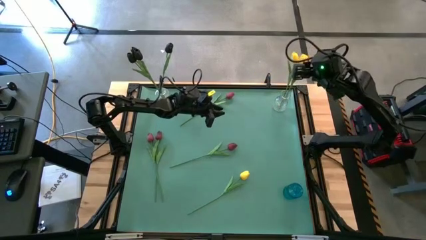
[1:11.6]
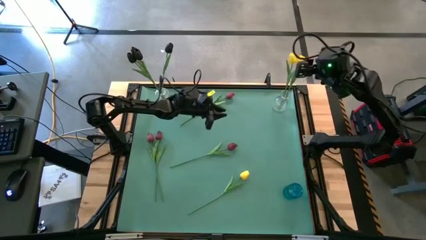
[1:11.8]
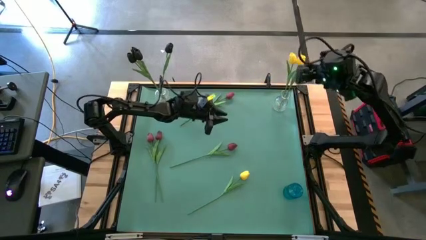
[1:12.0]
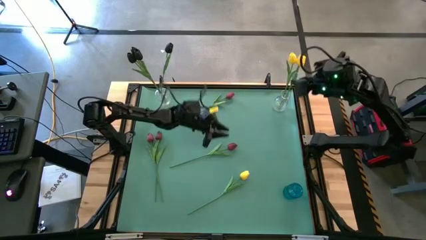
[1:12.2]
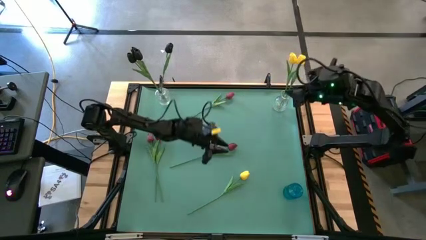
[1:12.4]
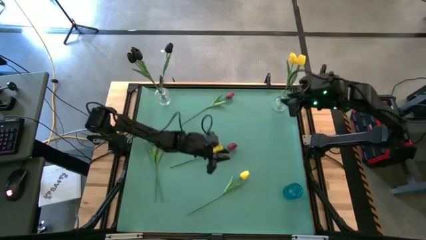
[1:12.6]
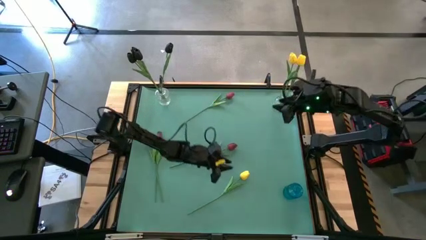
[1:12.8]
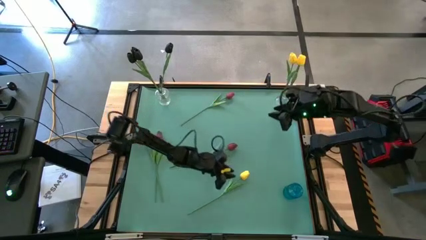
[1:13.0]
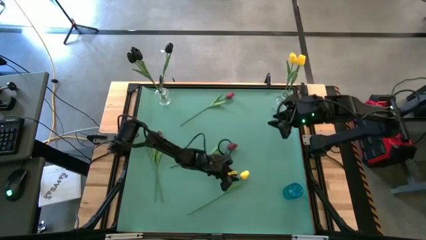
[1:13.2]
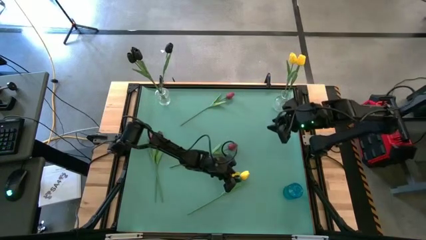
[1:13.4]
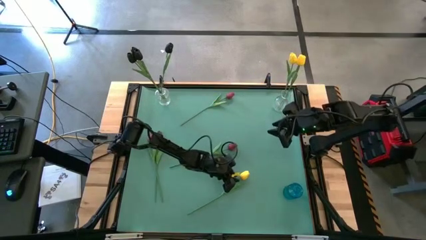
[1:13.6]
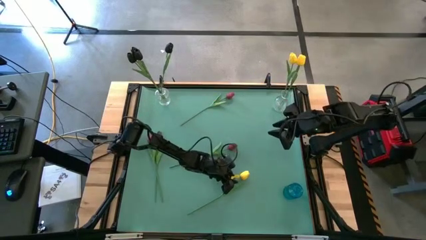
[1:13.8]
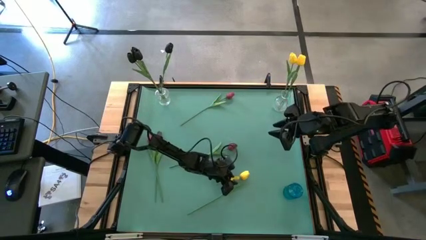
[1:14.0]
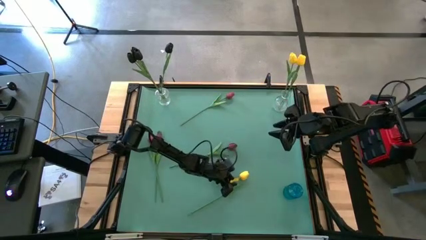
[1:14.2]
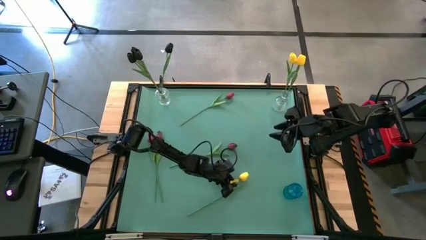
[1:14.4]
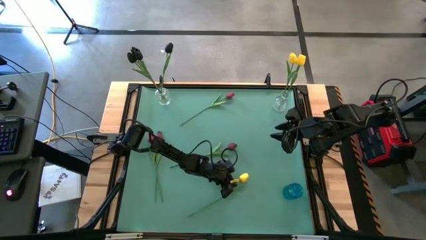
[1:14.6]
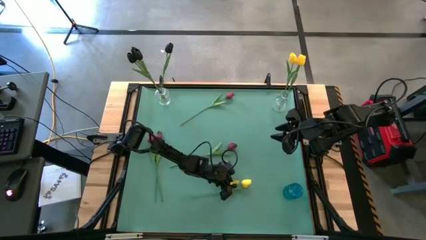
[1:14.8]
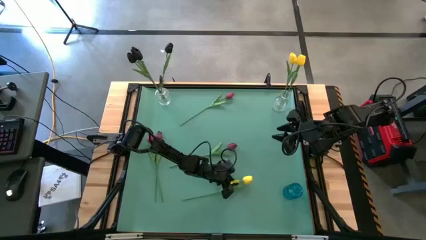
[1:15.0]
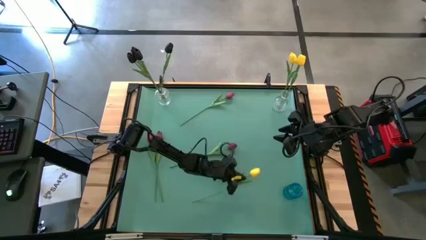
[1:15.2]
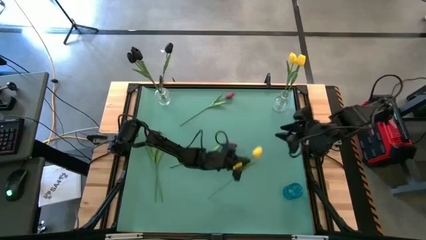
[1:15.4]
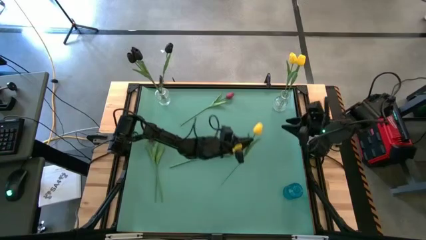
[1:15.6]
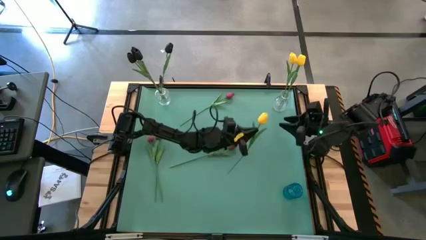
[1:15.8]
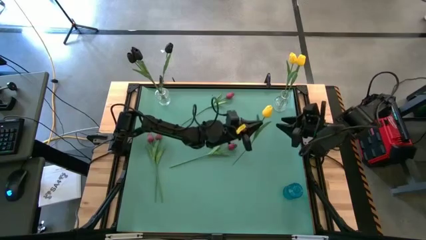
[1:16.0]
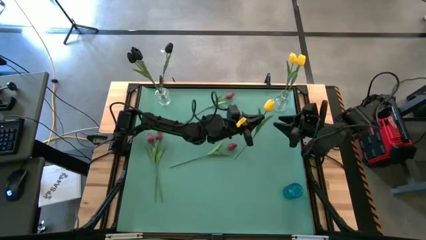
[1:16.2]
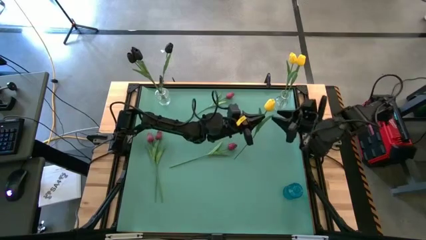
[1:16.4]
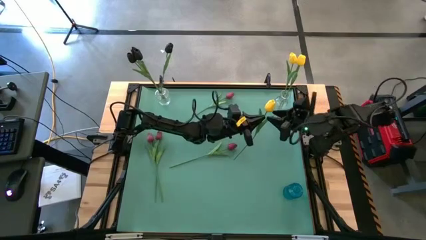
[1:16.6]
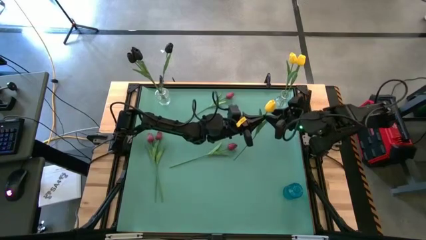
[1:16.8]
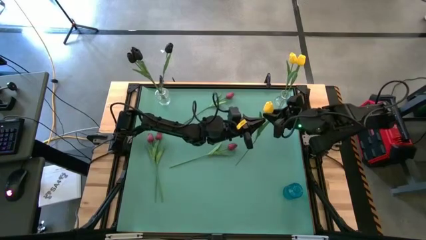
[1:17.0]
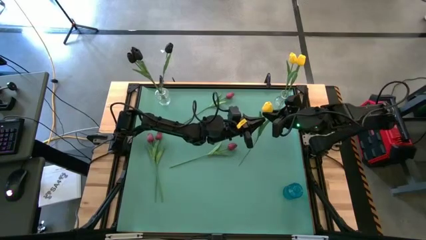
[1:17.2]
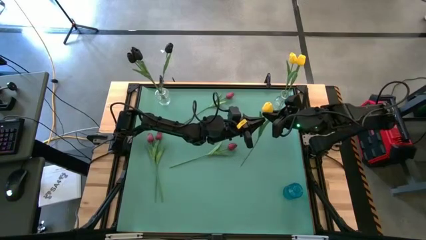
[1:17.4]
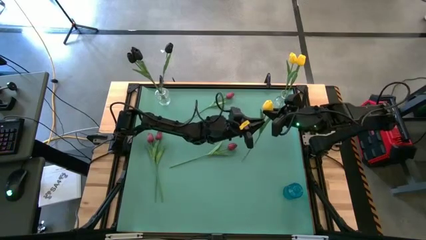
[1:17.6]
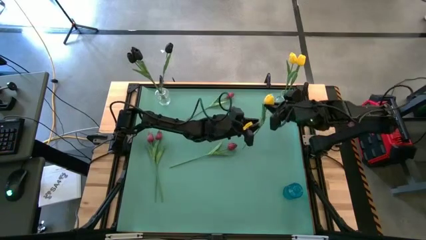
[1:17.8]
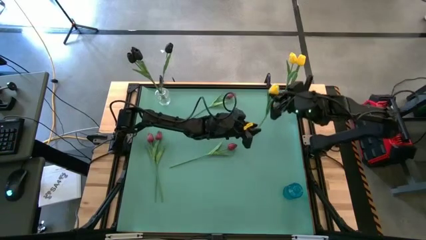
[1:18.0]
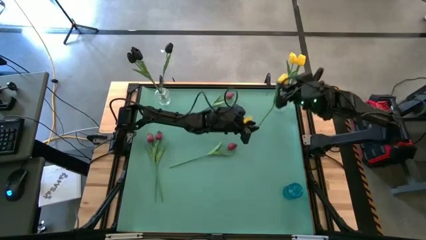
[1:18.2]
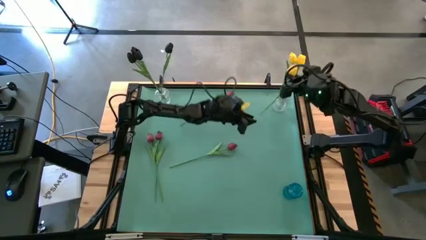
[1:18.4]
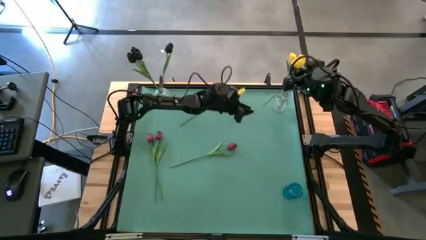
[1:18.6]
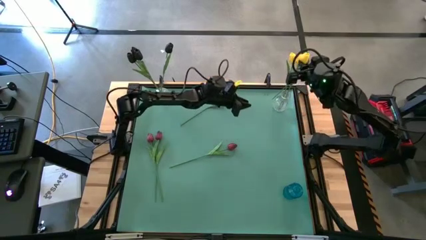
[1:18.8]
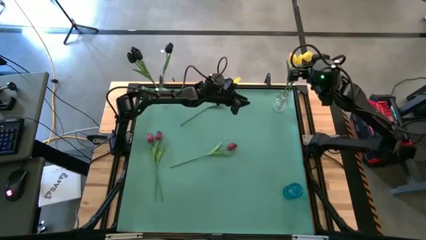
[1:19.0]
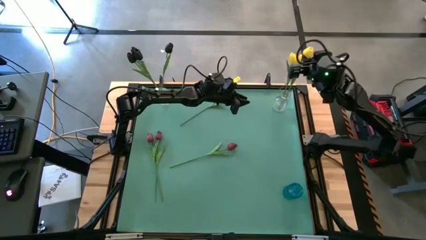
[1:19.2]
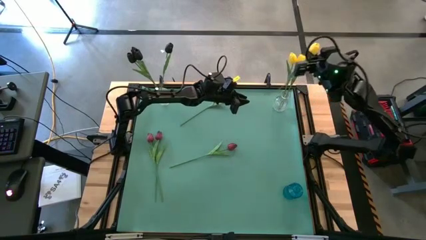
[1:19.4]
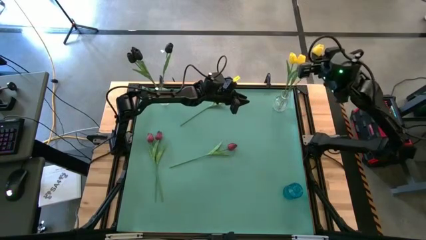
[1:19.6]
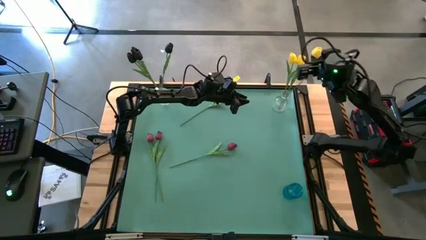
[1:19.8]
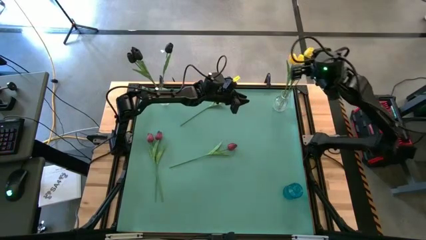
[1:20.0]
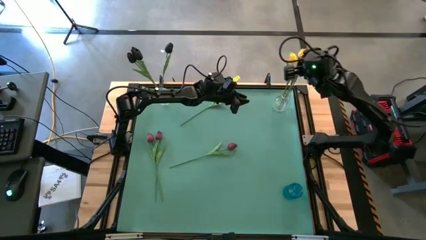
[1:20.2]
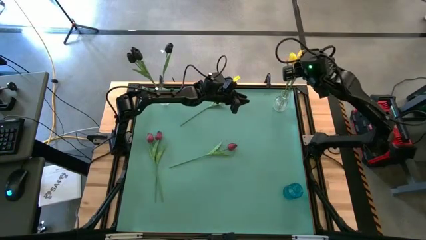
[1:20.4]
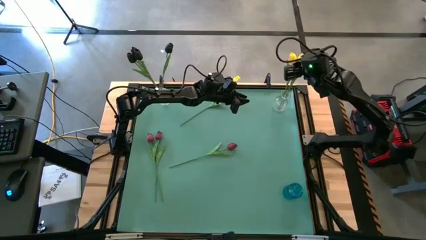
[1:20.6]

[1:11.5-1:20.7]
Task: Sort flowers into vase by color
Put the yellow flower into the right transparent vase

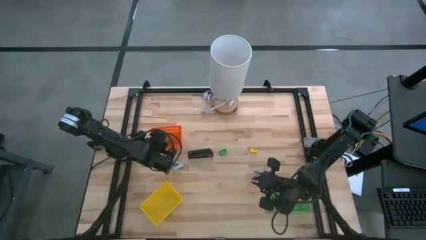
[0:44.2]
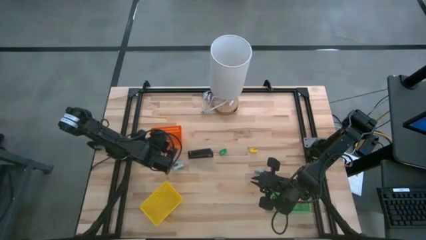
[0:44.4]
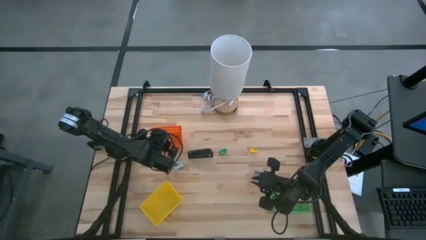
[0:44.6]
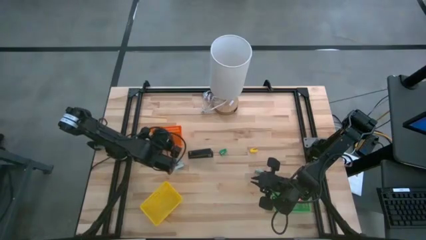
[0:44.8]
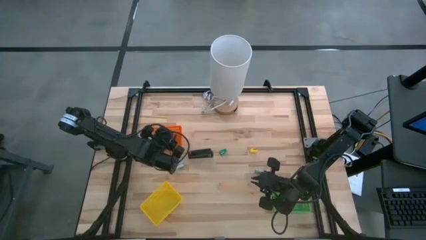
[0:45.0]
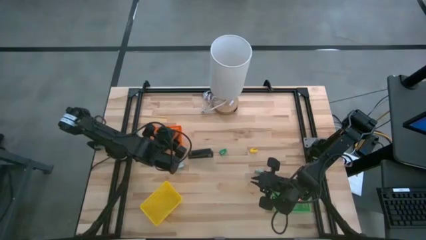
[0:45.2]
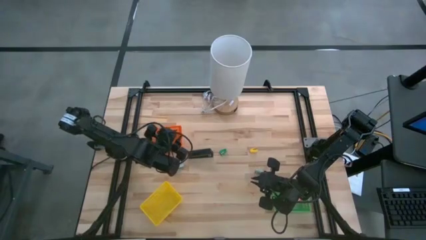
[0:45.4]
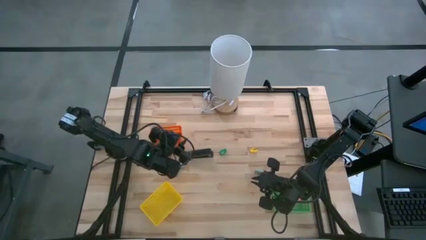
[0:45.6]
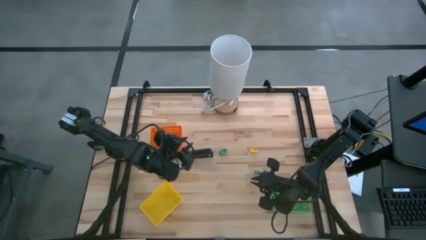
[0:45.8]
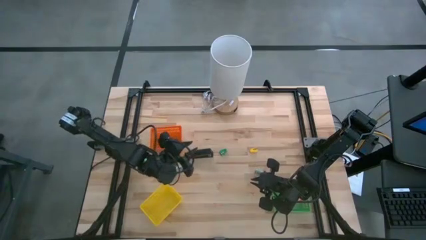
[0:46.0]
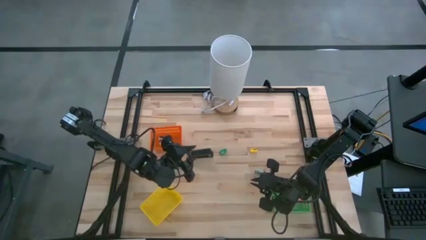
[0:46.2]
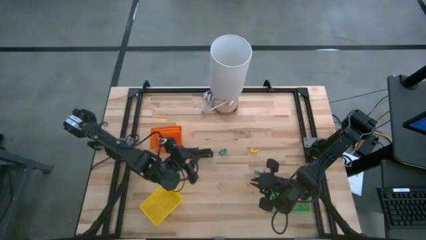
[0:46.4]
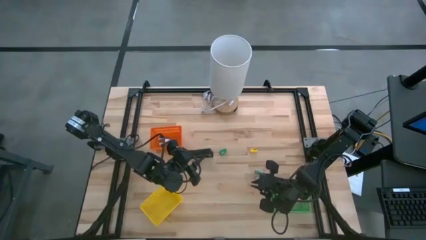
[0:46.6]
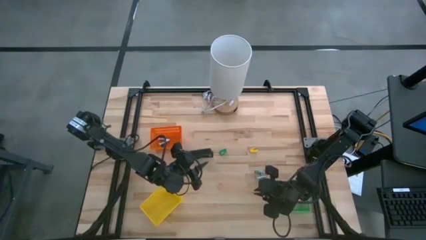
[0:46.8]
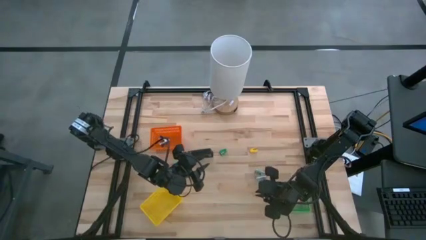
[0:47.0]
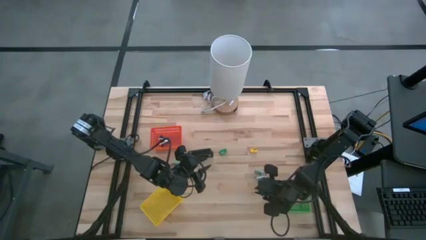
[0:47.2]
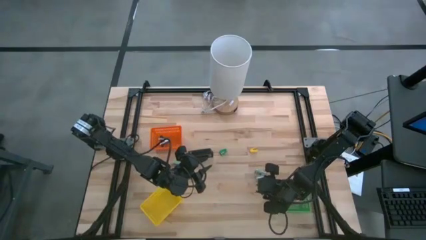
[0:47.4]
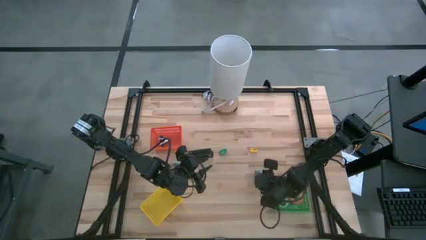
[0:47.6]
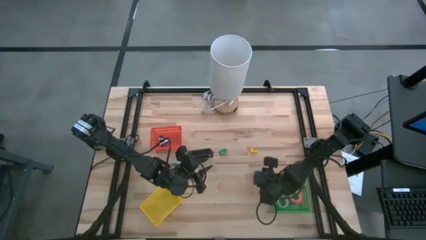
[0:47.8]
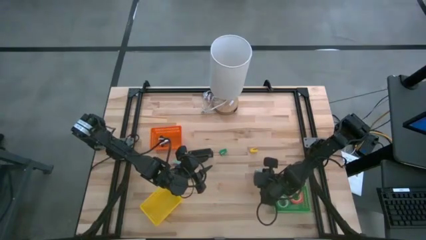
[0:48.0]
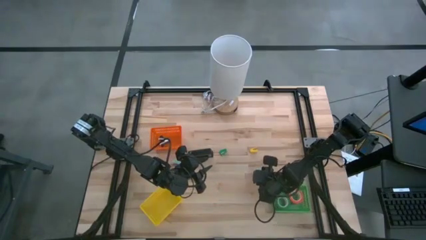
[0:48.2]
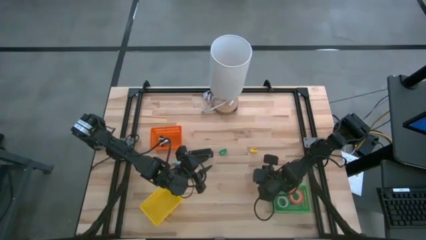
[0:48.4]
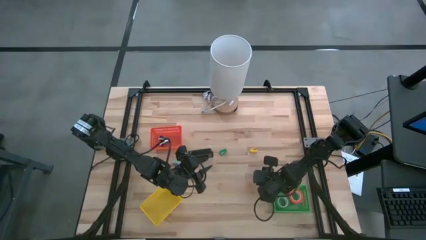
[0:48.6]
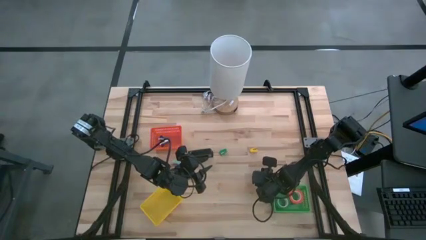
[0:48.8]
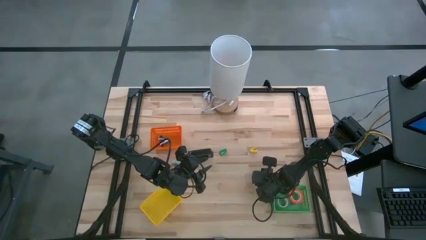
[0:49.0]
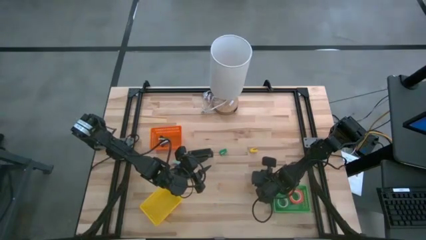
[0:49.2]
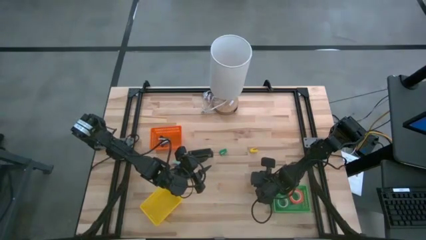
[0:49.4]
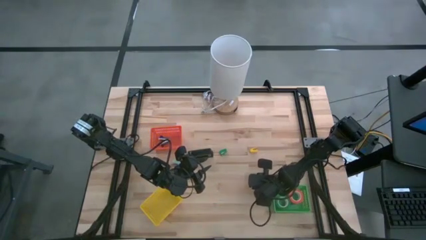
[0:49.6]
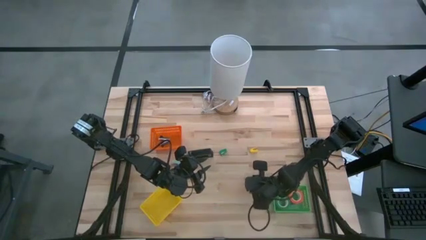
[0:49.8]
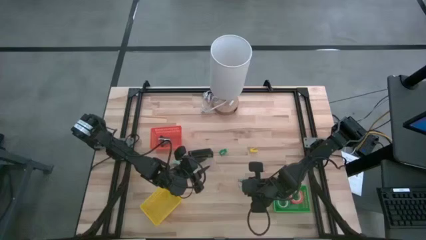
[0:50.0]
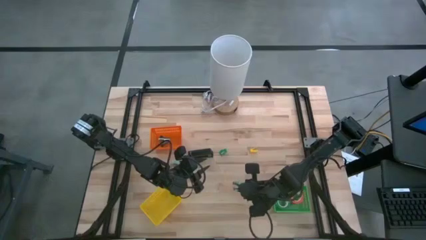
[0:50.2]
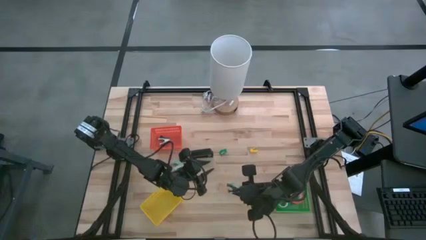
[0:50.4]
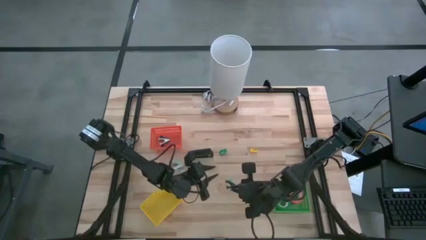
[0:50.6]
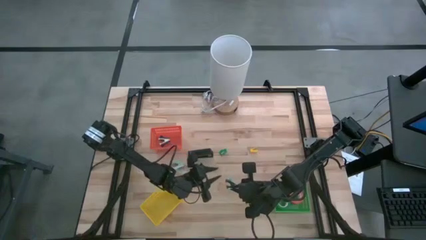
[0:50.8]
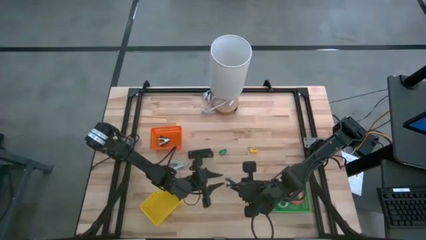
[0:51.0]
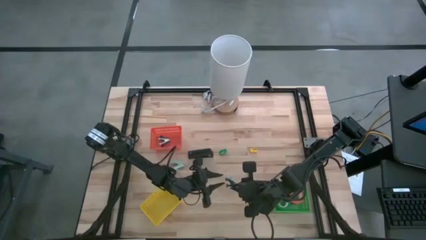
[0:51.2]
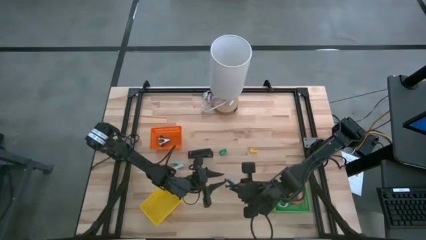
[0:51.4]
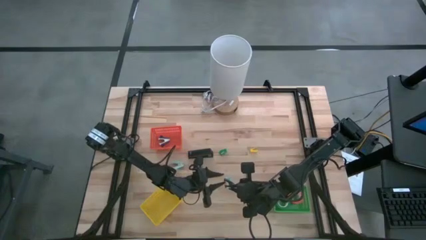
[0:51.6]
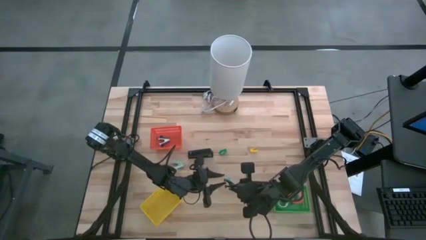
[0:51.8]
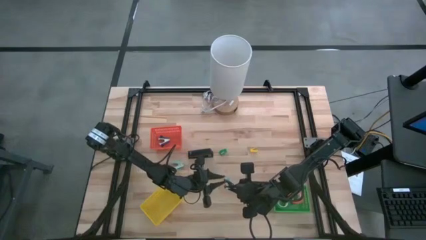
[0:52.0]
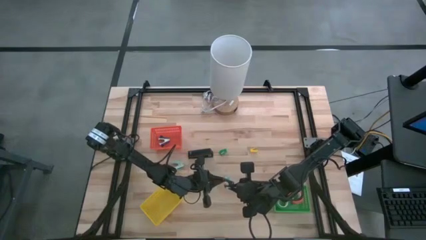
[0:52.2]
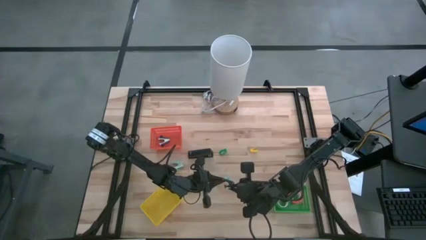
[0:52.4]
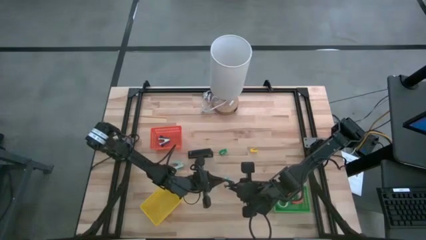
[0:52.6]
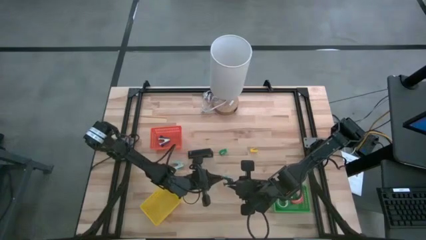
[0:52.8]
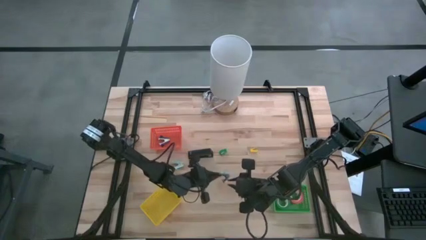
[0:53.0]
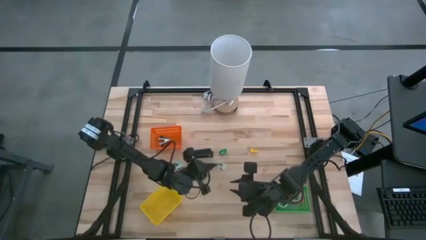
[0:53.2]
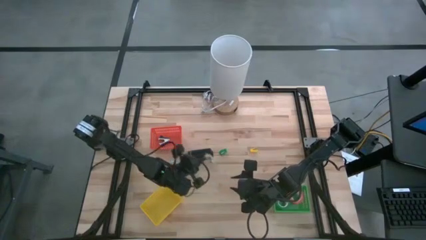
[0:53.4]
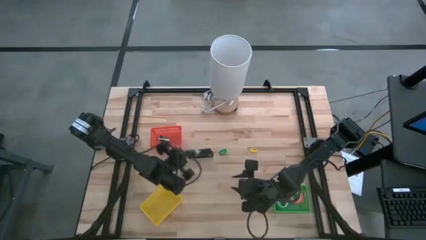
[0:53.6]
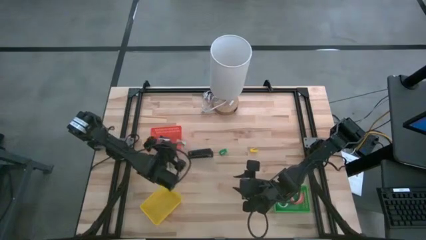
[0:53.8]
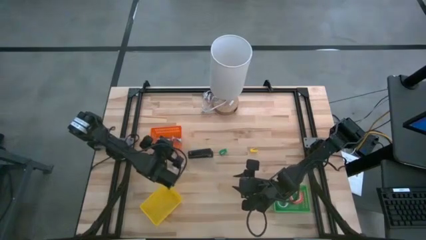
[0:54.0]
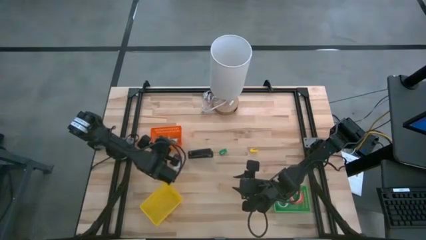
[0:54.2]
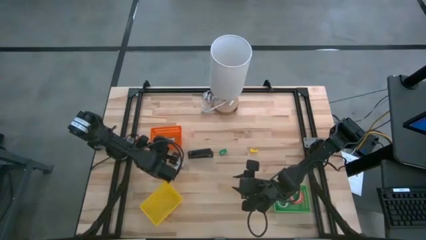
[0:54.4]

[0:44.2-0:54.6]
Task: Pick and place Stapler, Stapler remover, tape
Put the right blue staple remover into the orange bin
